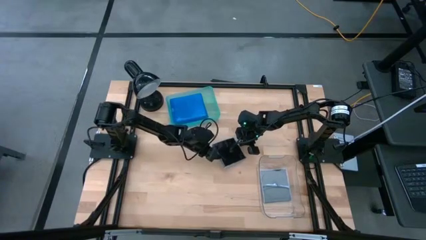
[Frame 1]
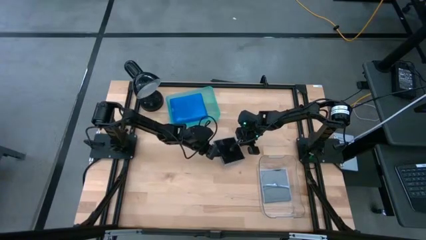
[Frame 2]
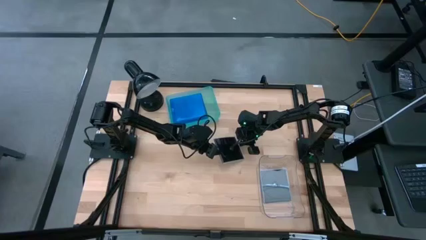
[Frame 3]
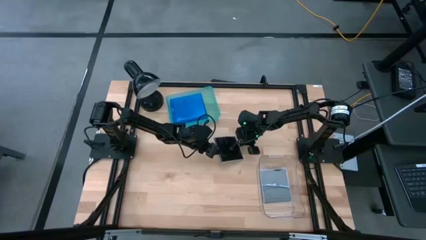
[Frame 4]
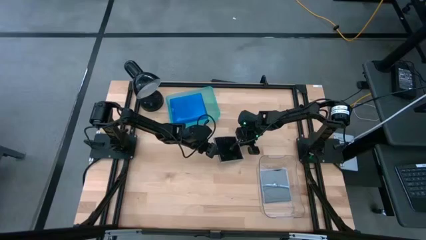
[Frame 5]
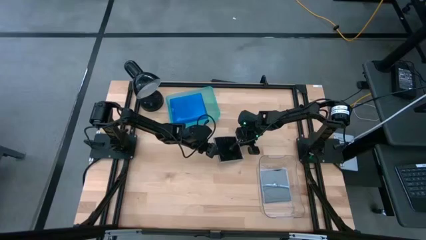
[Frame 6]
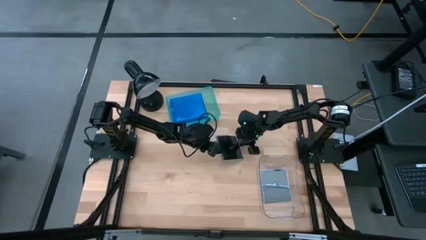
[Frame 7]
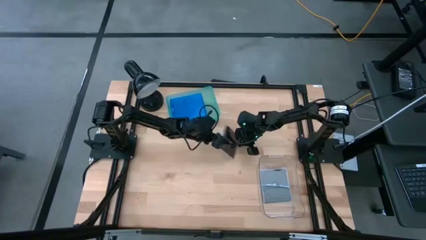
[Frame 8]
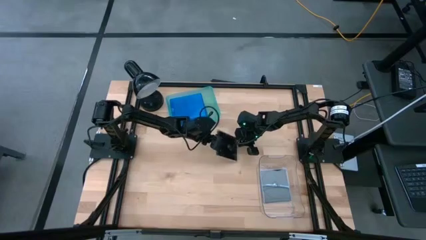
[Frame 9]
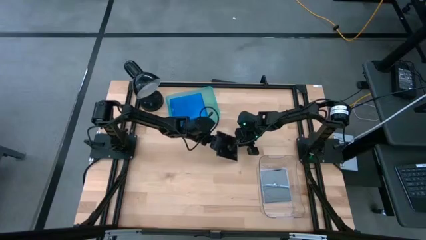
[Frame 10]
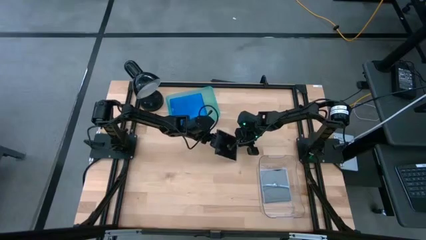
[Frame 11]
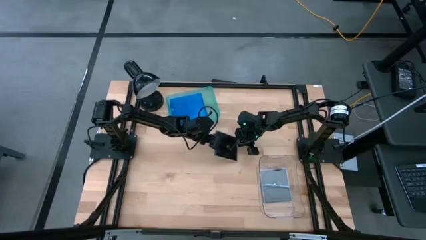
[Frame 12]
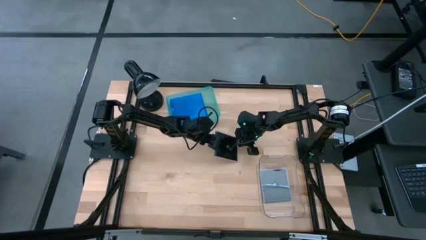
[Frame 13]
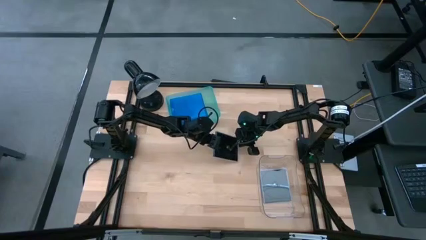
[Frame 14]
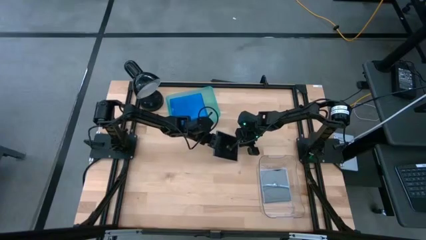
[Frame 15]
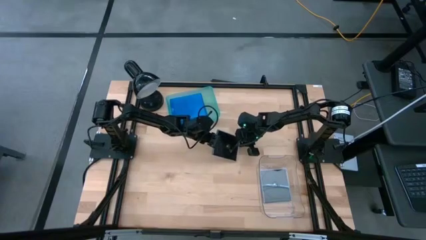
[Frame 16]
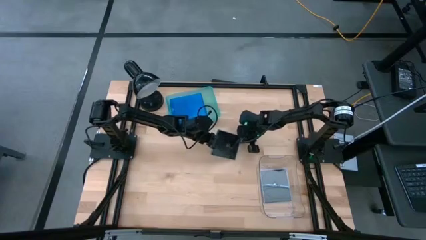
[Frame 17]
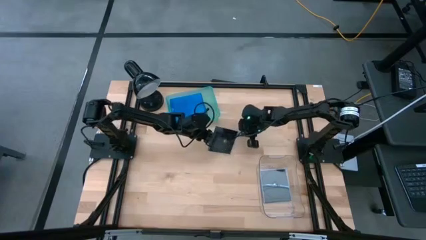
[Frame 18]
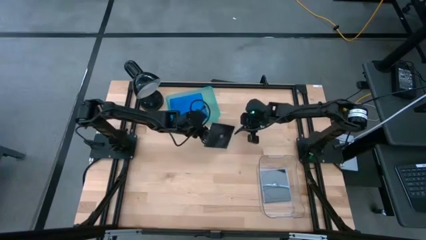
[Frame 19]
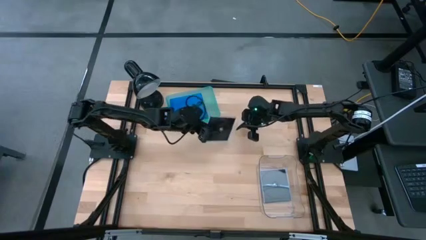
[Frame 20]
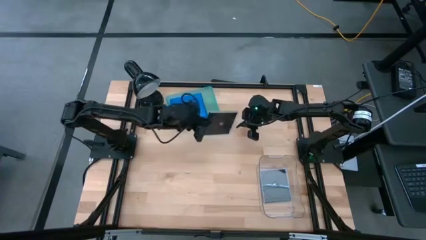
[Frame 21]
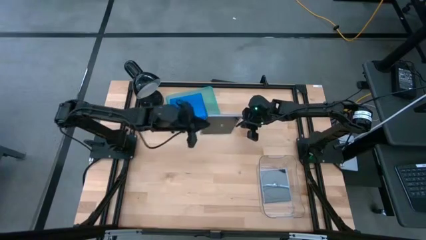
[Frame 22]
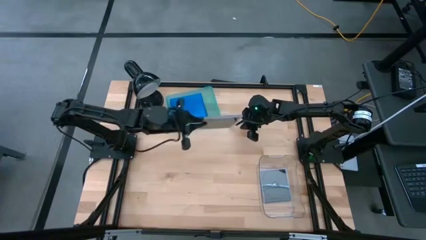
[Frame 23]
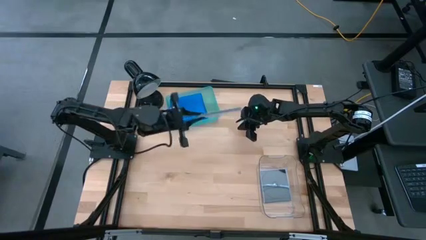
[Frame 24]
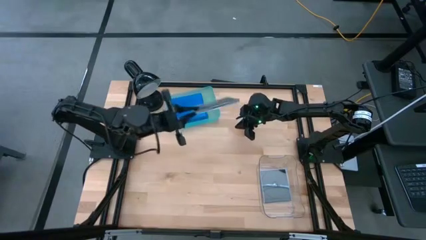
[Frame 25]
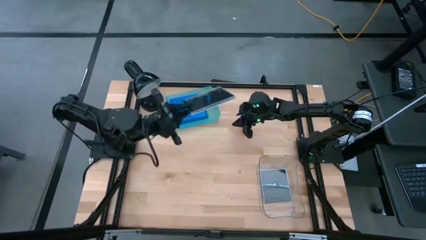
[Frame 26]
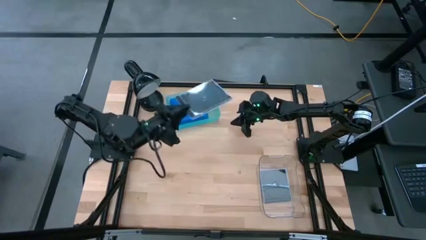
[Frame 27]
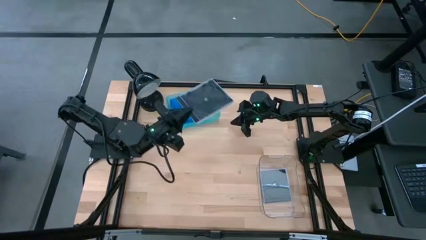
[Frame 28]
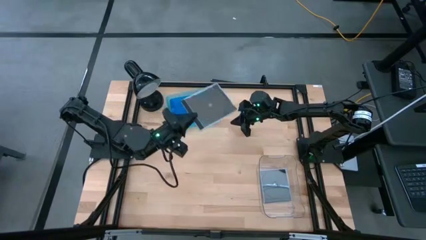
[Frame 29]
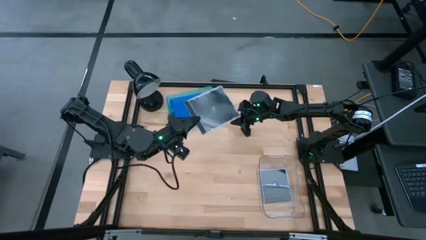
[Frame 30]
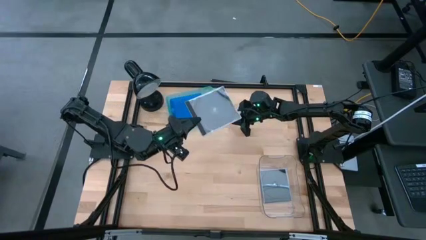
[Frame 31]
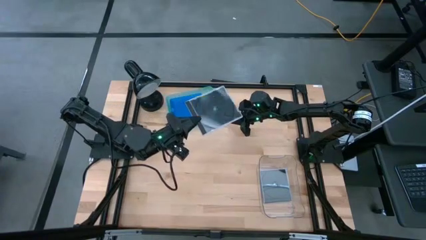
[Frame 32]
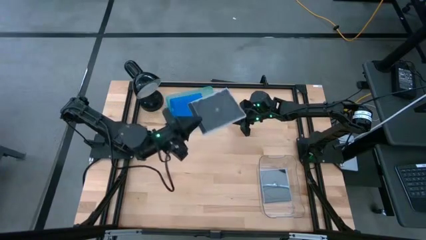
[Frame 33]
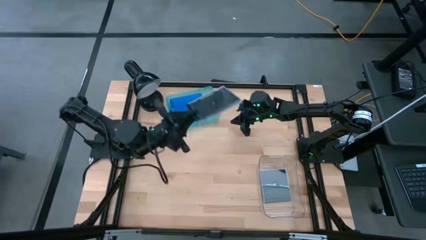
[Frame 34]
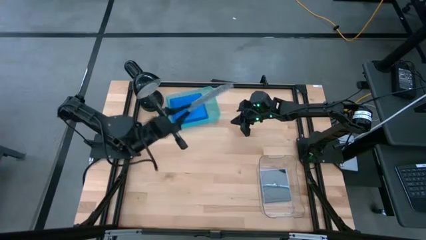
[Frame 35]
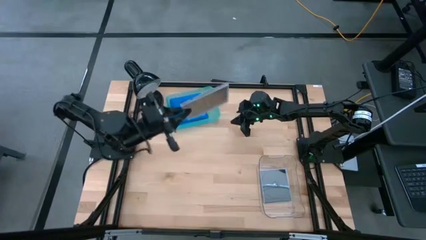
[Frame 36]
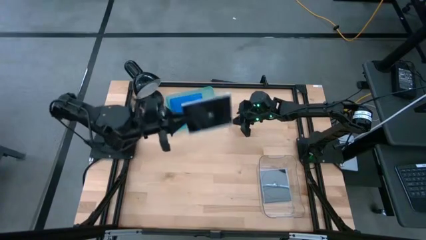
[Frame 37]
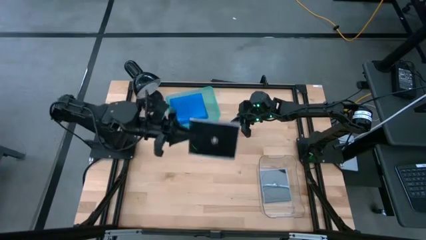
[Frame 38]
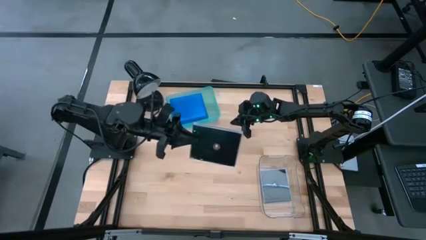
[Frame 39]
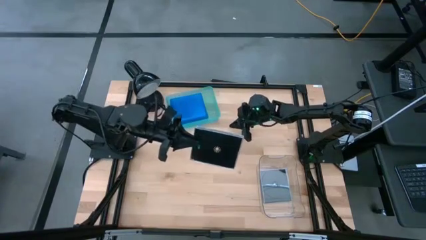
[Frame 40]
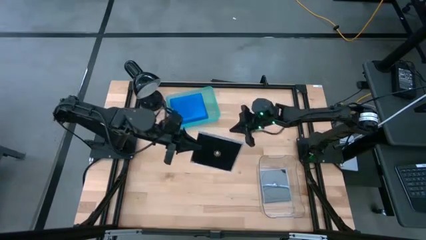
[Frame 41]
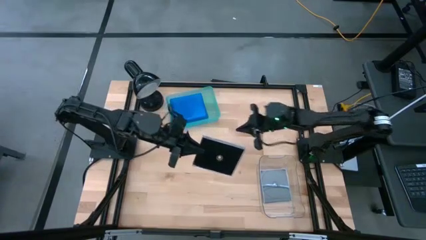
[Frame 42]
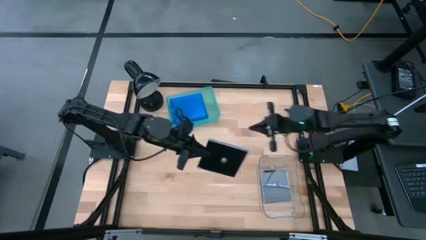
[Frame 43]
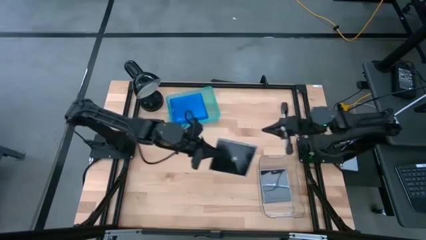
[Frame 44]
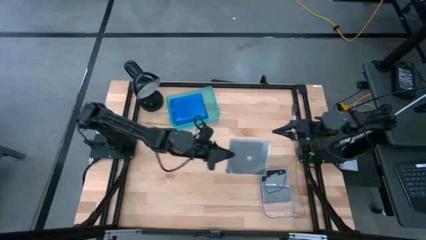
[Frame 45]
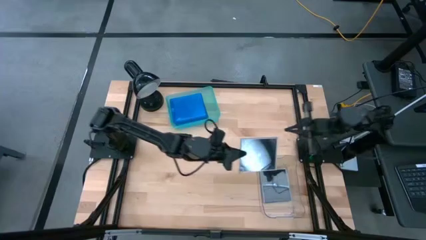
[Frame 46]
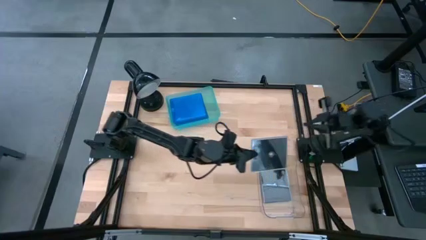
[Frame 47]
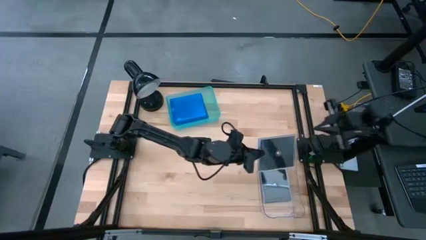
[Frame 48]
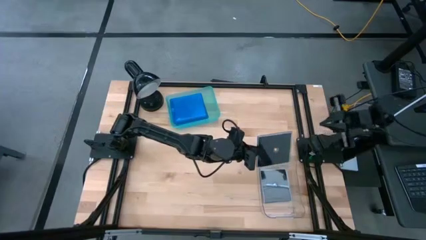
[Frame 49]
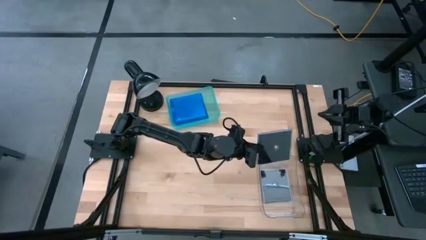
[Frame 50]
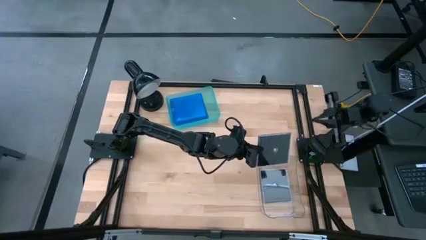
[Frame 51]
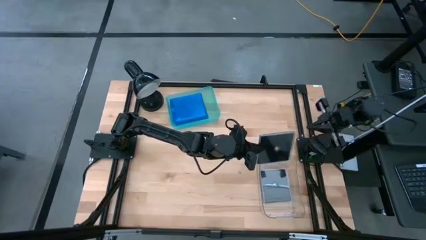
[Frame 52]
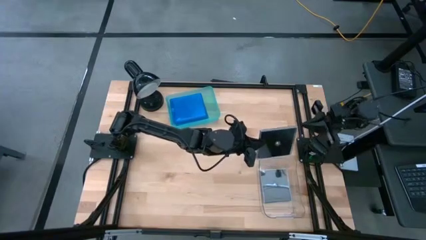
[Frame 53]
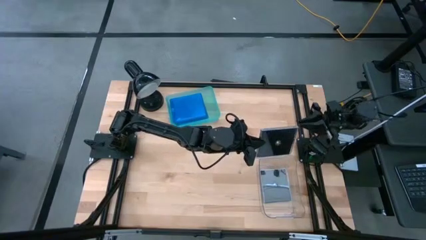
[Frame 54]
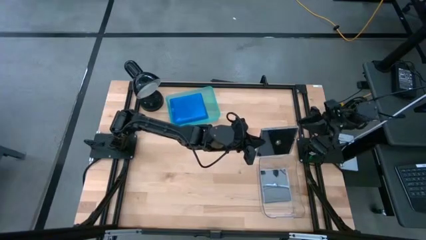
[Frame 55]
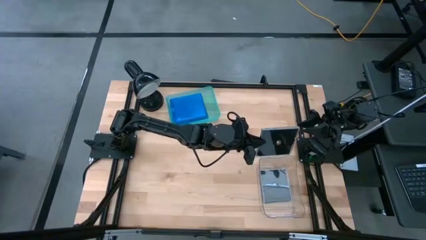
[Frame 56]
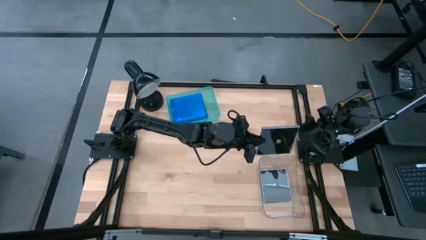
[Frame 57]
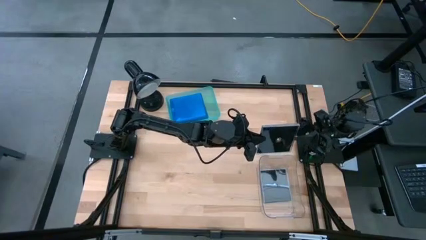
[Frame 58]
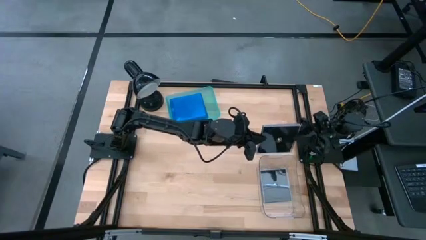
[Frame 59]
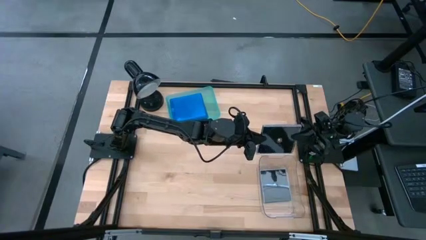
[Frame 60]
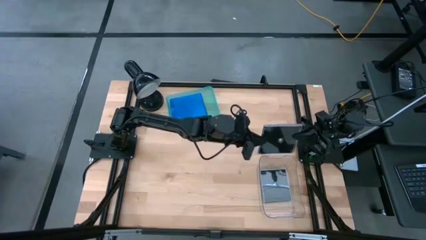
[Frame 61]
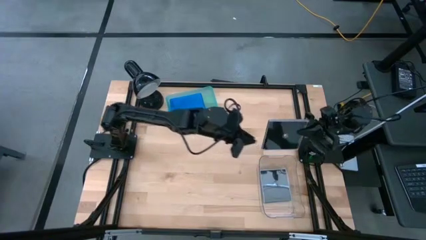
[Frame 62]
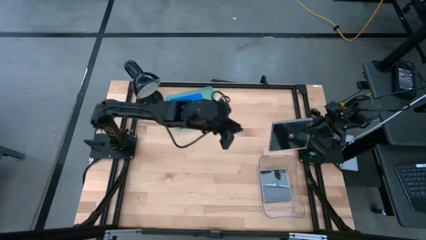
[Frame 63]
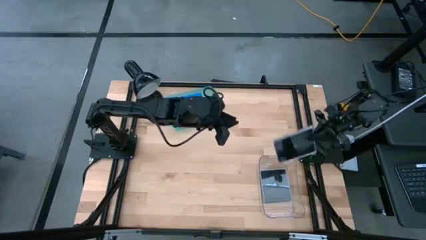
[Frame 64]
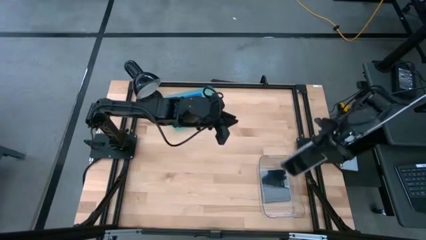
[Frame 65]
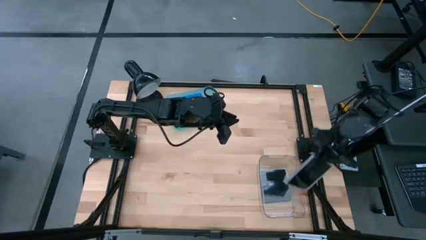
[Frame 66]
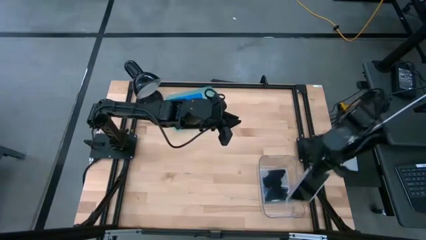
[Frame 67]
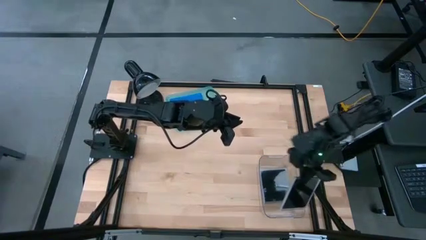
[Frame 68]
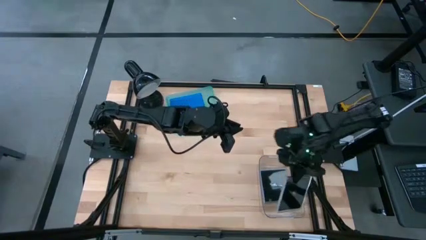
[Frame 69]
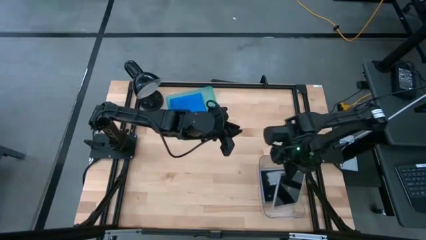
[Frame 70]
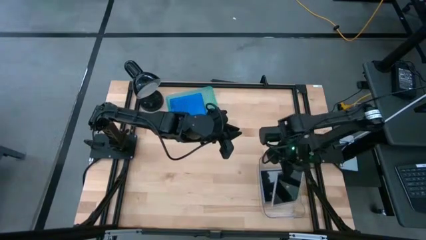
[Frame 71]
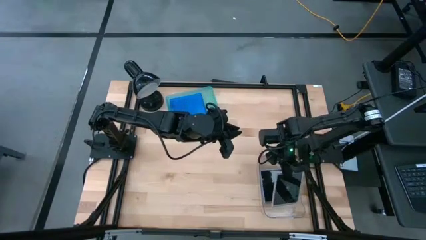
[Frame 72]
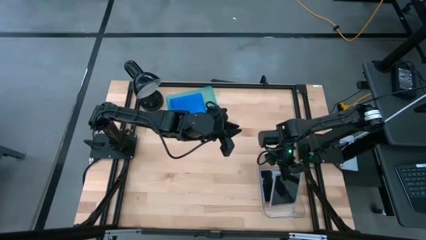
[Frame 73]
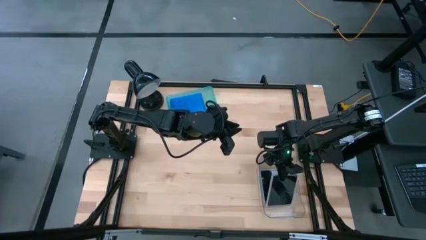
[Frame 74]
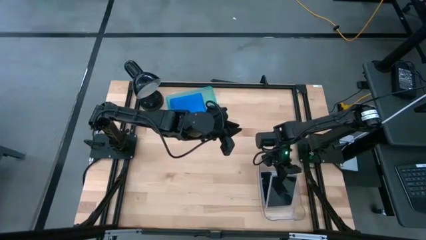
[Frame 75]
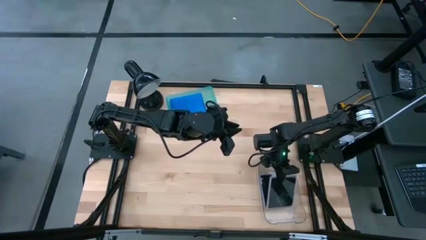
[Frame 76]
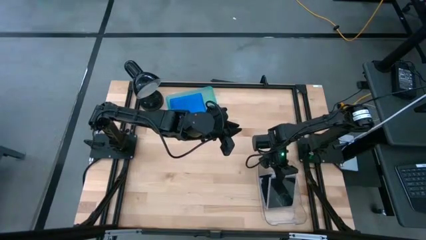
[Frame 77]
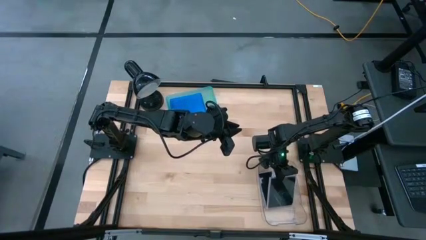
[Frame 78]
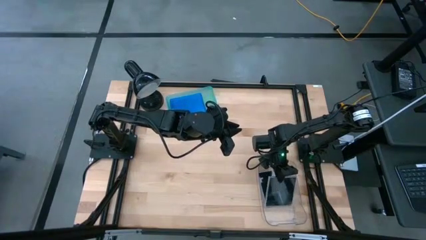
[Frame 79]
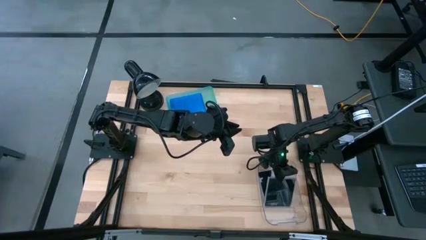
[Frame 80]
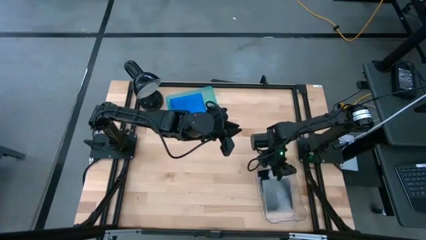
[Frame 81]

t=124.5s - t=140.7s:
Task: Pick & place jewel cases by type
Put the black CD case into the transparent bin

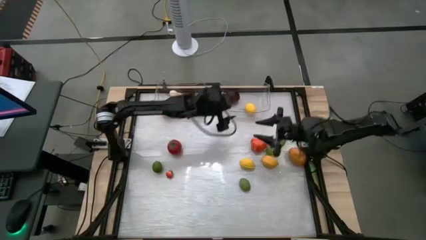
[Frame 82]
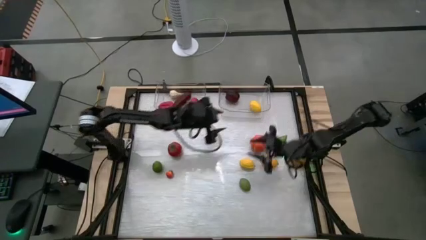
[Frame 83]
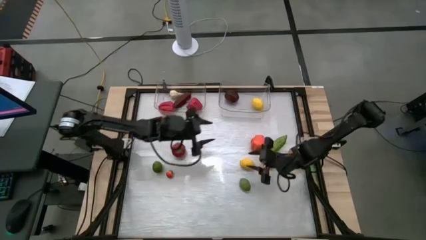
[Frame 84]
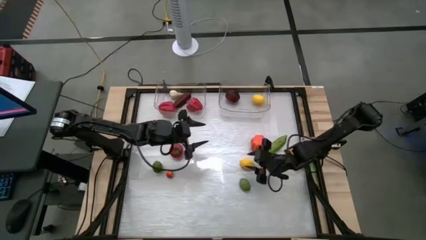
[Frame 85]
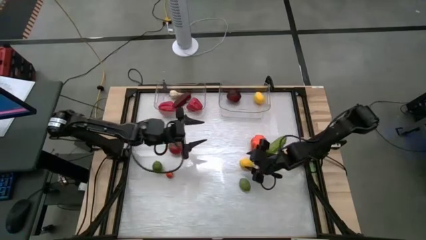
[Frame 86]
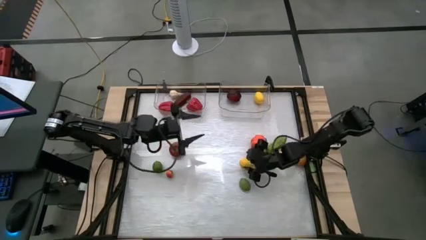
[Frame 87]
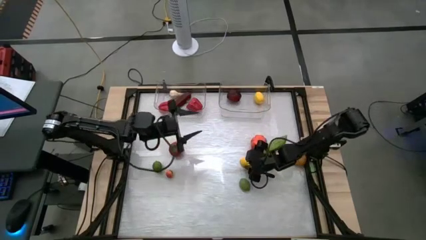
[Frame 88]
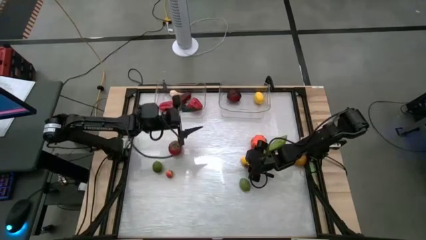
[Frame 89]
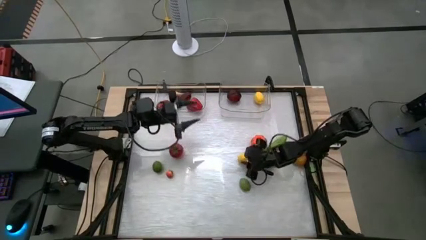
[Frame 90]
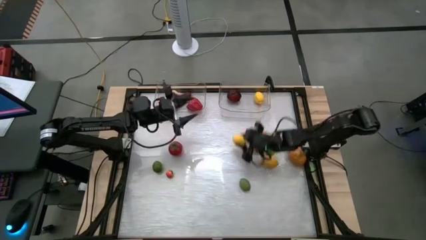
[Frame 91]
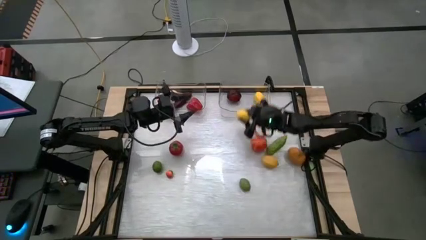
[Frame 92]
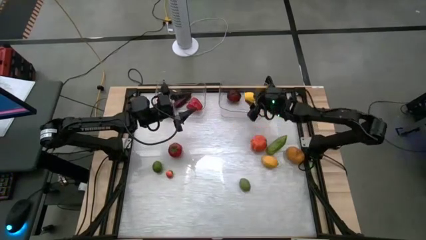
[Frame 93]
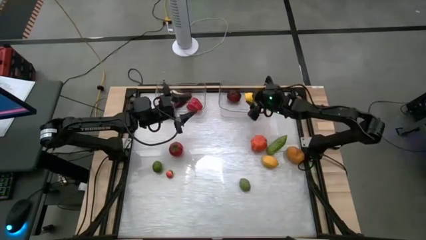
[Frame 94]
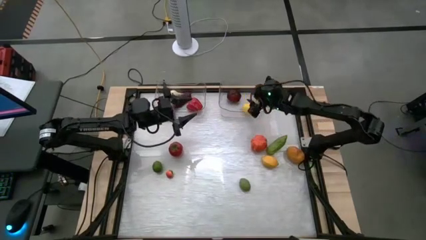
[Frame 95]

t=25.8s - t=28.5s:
Task: Sort produce into baskets
Put the lemon in the container
